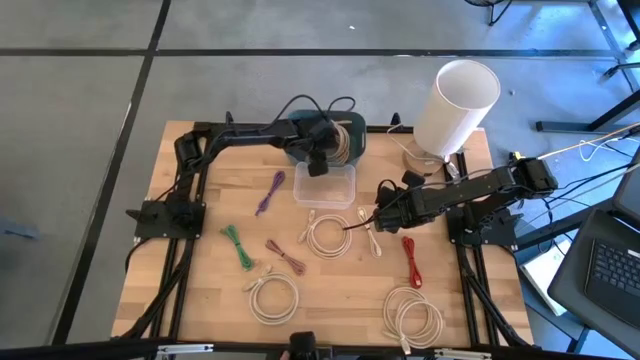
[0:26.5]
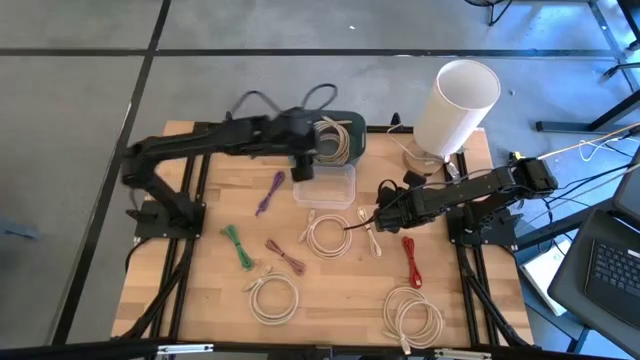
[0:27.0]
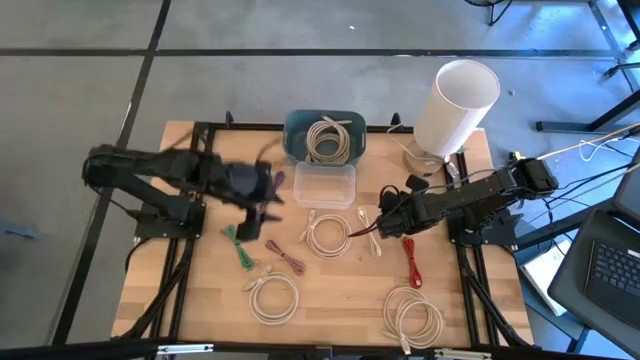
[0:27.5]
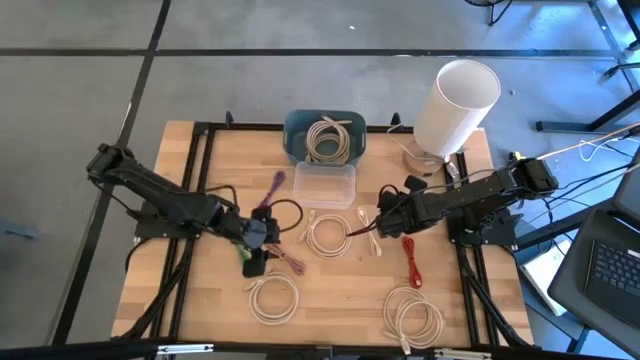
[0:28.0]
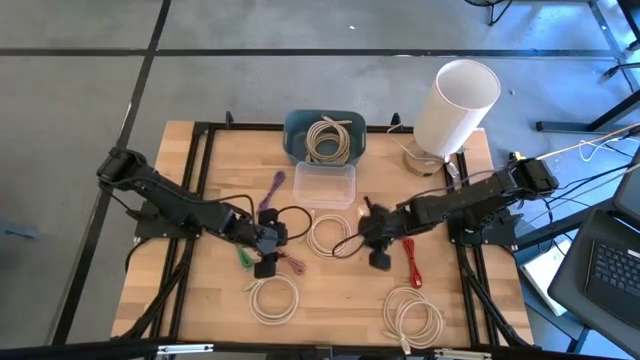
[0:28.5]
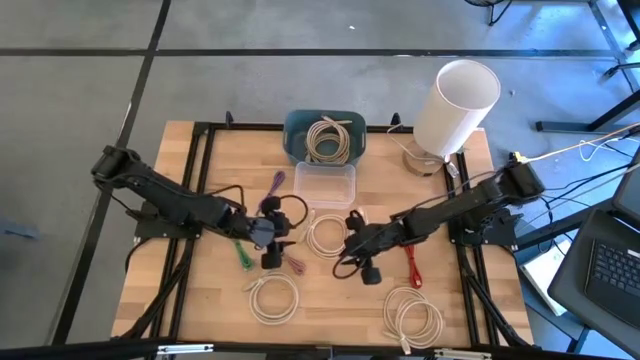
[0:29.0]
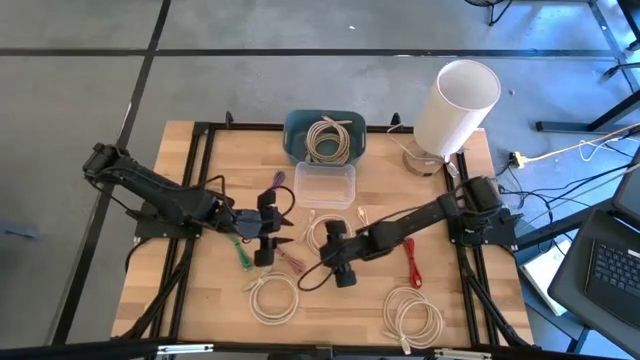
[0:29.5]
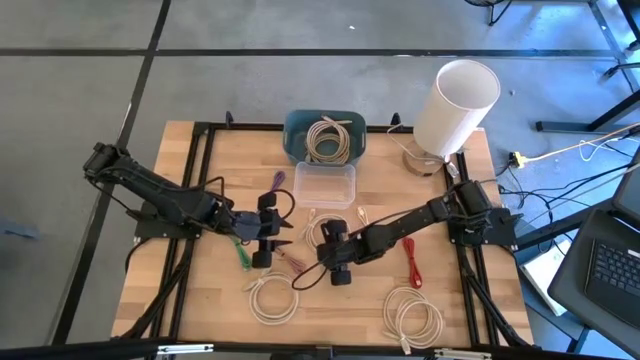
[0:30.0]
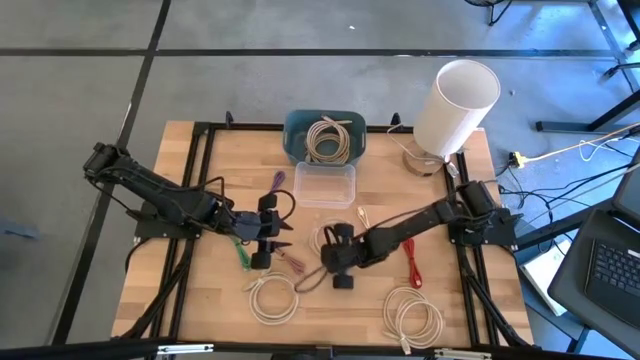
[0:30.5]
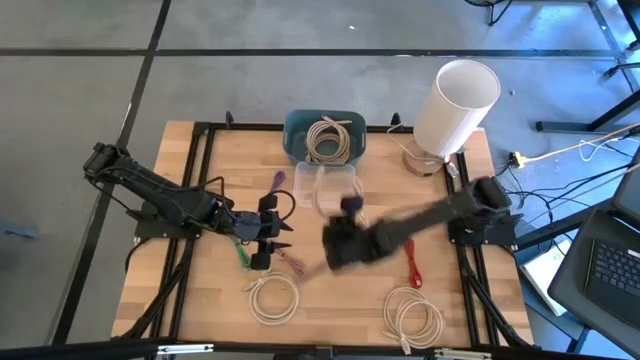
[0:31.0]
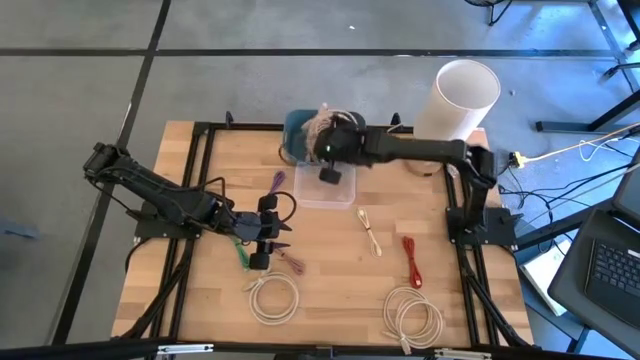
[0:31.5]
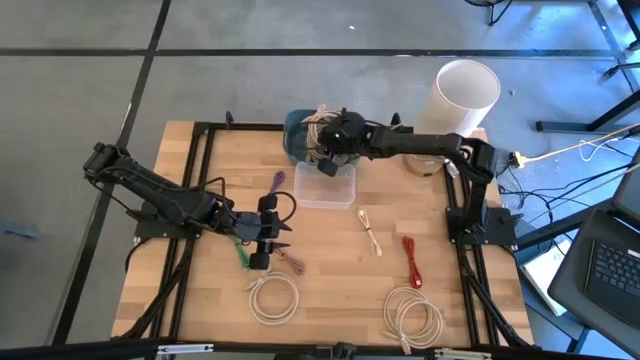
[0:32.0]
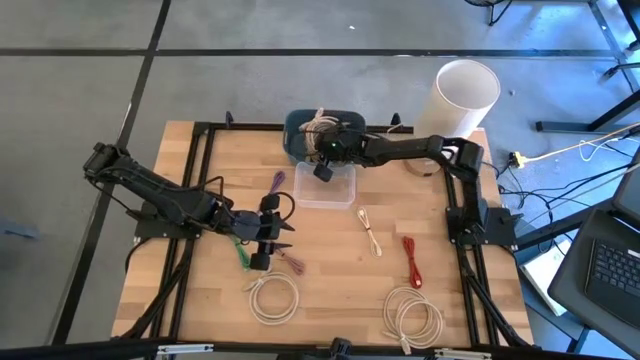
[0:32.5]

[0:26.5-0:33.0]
Put the brown HDMI cable into the blue bin

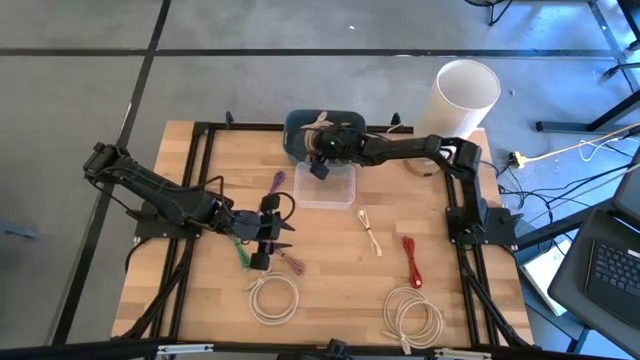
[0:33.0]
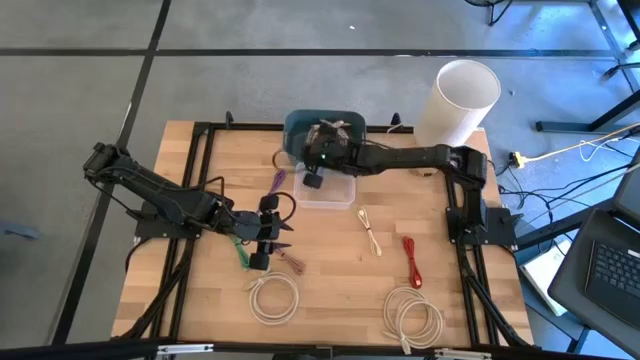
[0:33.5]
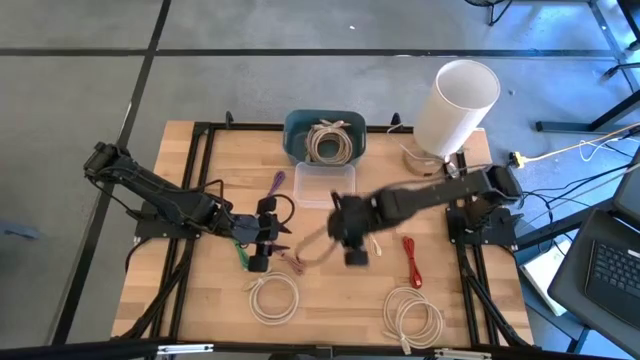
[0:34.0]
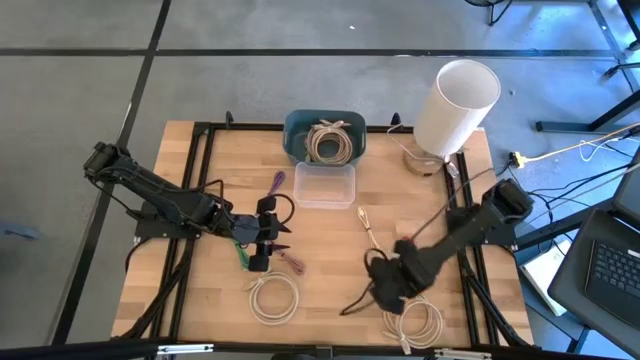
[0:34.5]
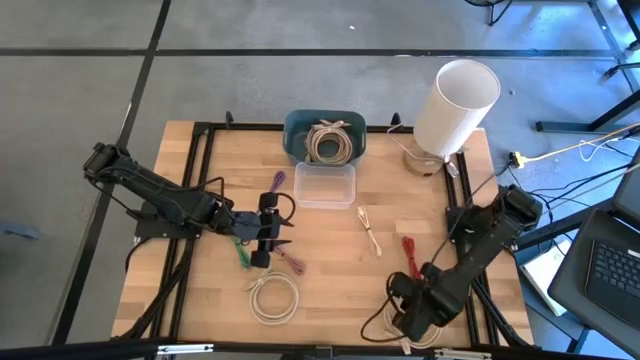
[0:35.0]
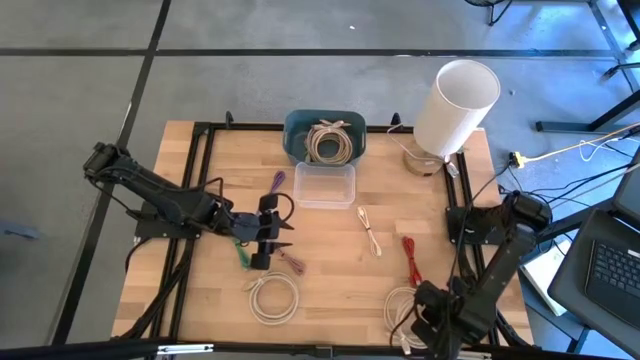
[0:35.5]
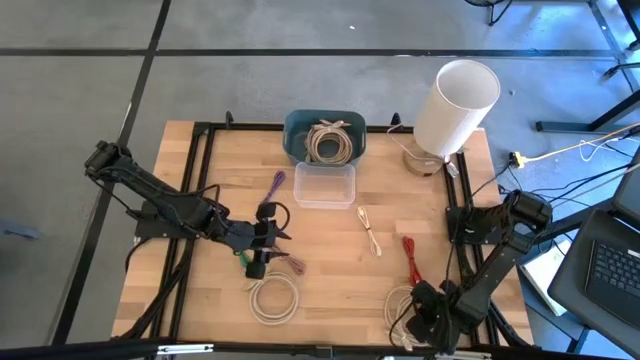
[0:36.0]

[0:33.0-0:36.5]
Put the brown HDMI cable into the blue bin

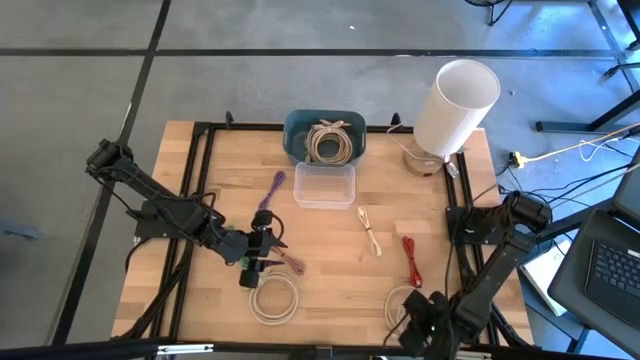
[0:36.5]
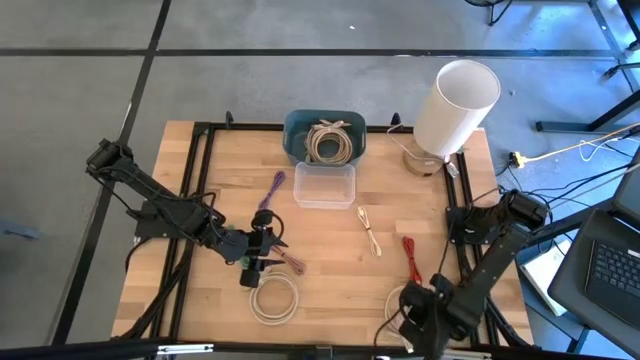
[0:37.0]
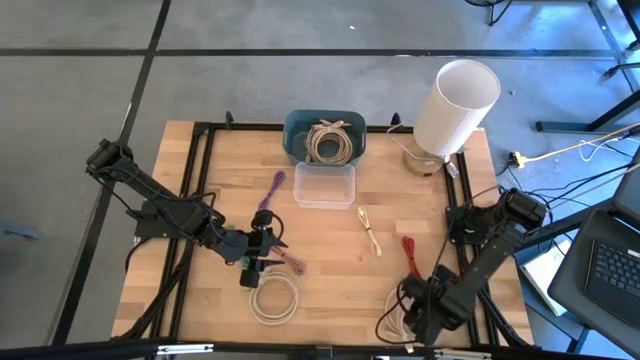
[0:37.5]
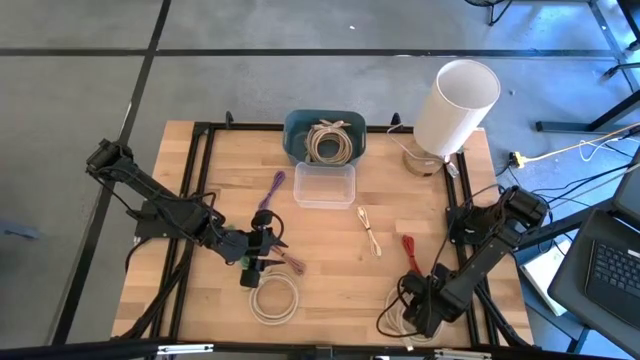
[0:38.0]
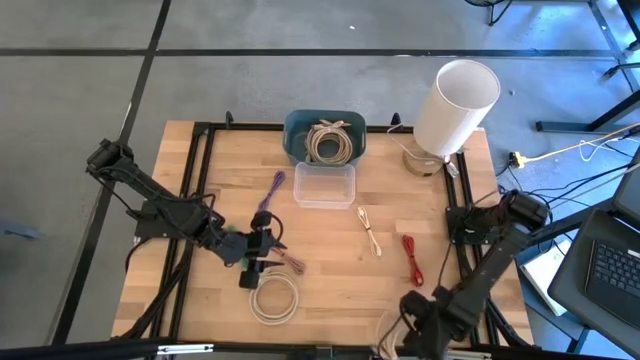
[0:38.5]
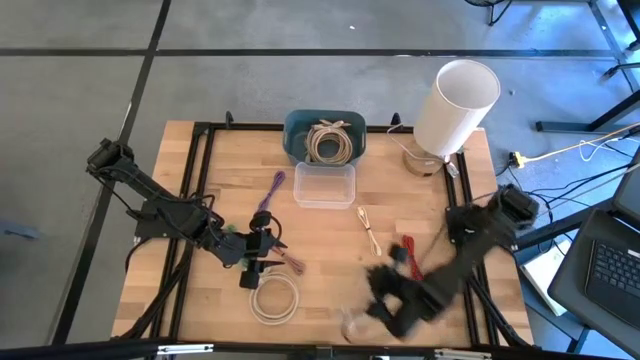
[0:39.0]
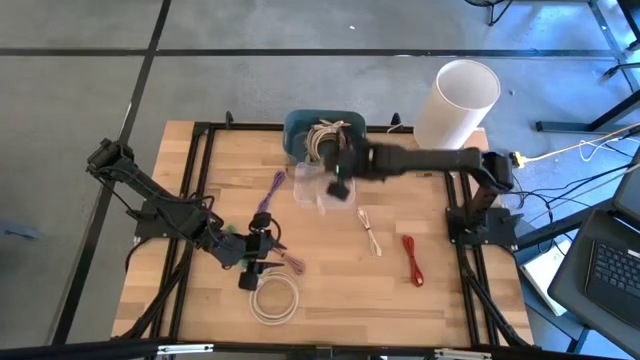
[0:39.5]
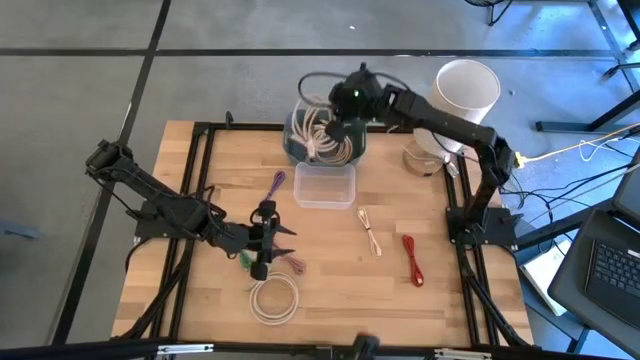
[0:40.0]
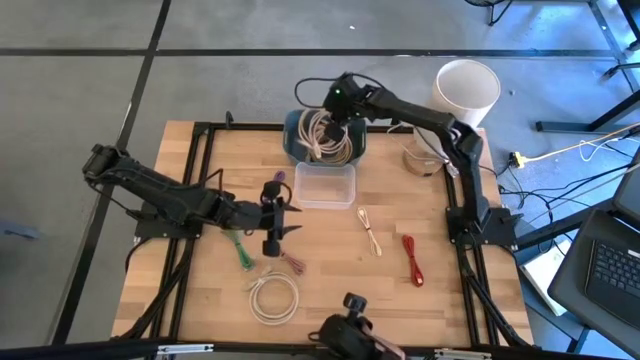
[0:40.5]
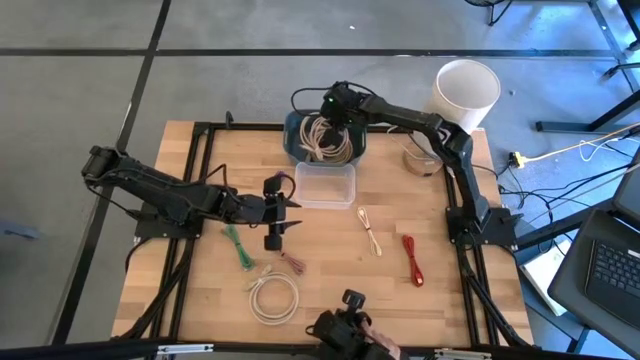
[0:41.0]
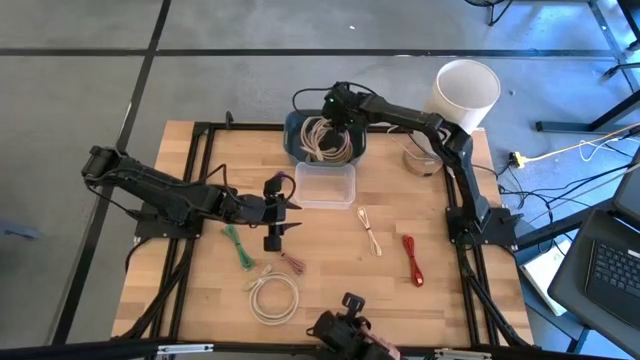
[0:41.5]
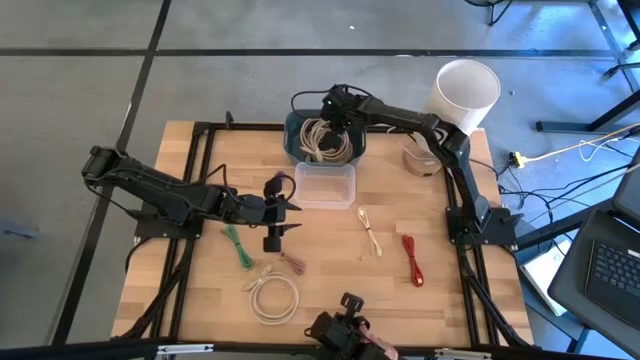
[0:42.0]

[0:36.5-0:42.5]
Put the brown HDMI cable into the blue bin

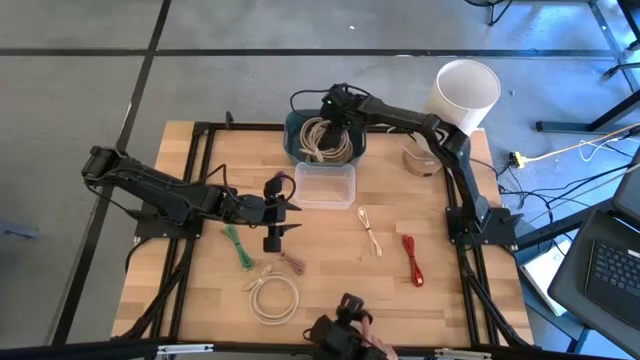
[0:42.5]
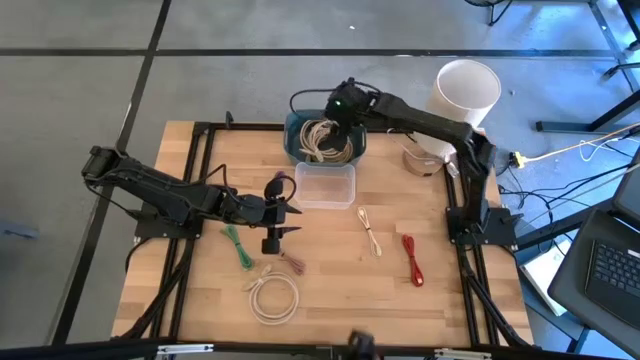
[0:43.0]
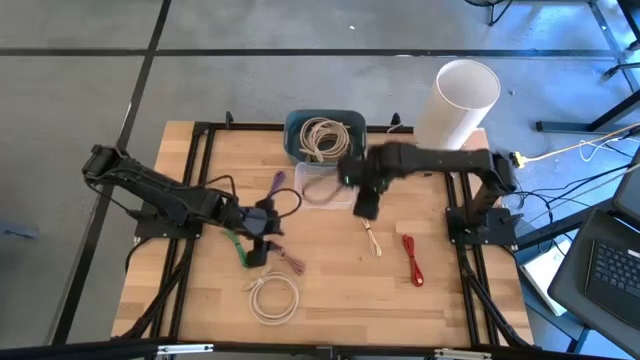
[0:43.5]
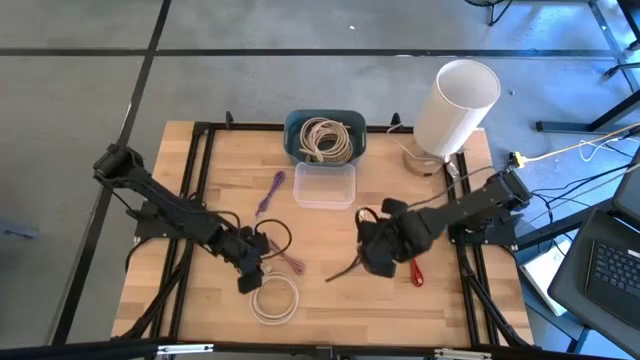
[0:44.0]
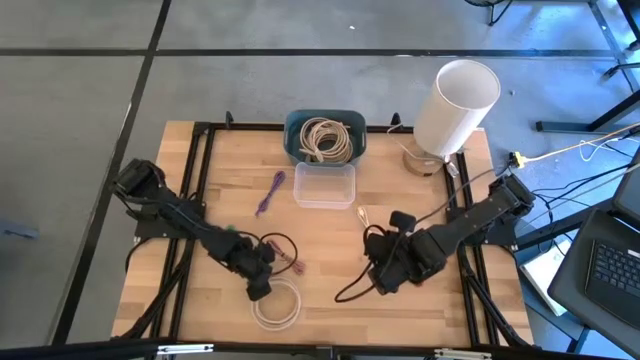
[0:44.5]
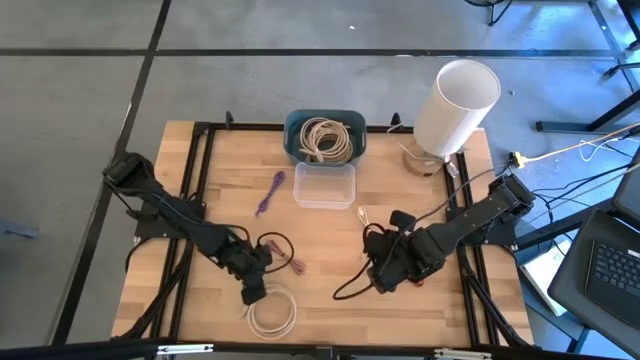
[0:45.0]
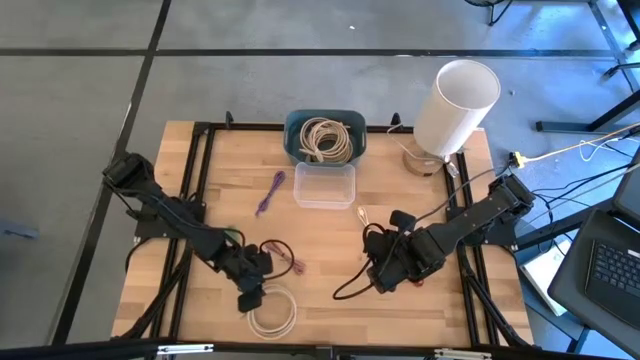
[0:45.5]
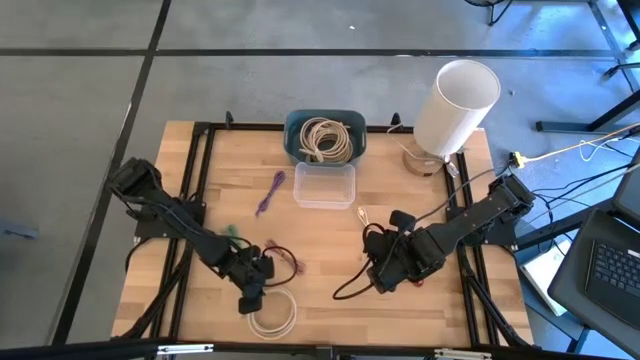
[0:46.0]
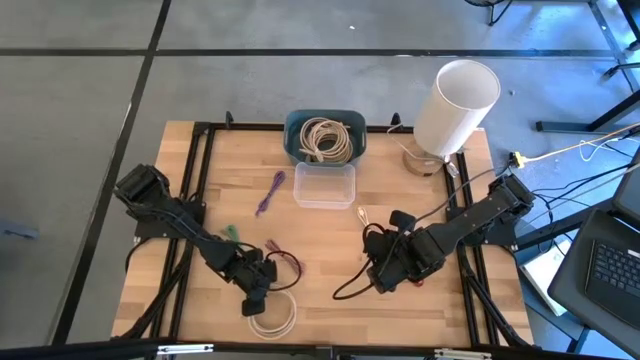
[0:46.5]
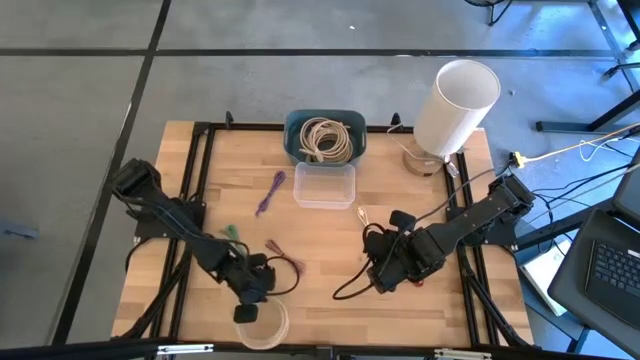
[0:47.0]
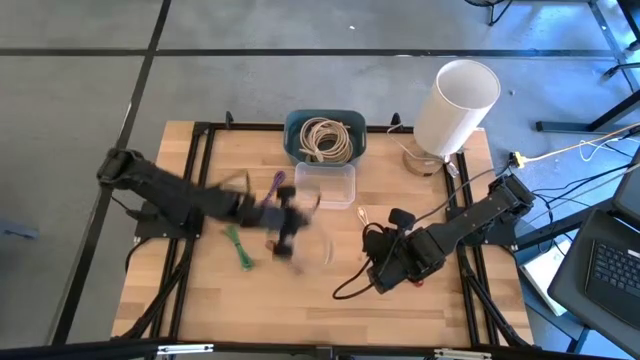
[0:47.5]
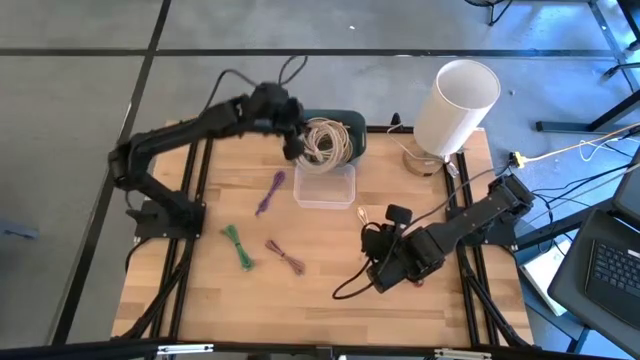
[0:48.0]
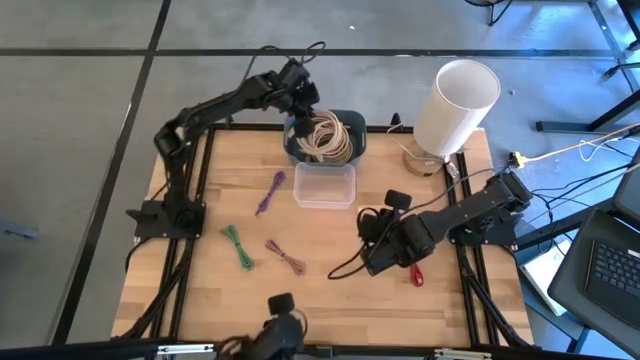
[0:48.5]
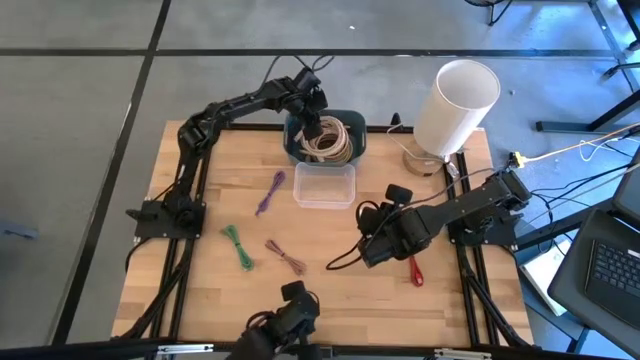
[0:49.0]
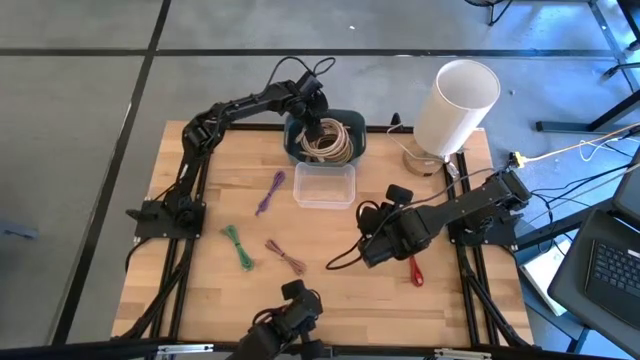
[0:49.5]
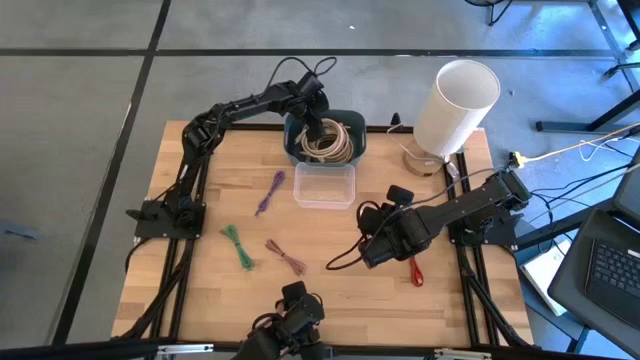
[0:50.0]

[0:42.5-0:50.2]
Put the brown HDMI cable into the blue bin
